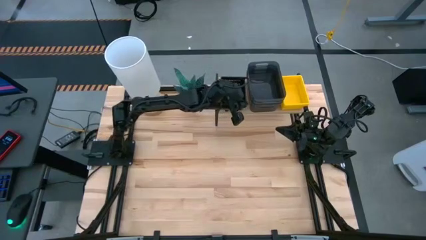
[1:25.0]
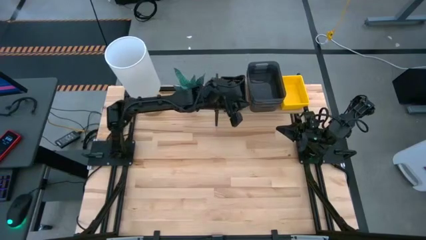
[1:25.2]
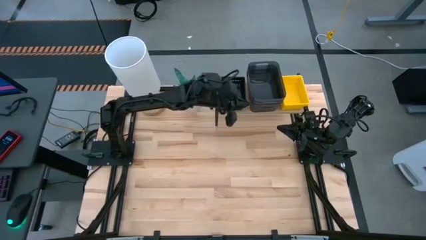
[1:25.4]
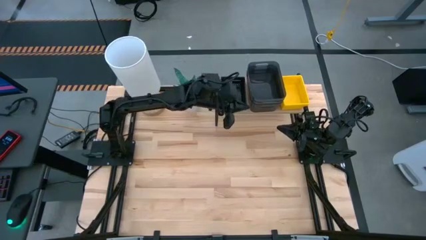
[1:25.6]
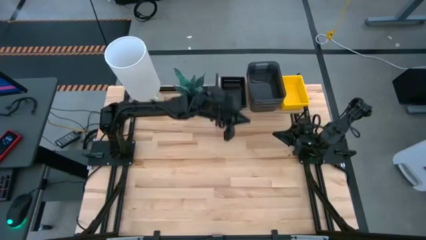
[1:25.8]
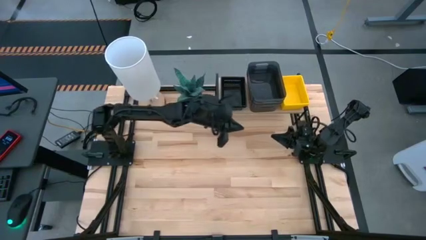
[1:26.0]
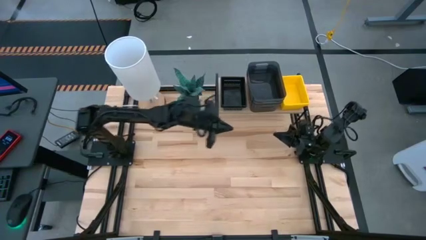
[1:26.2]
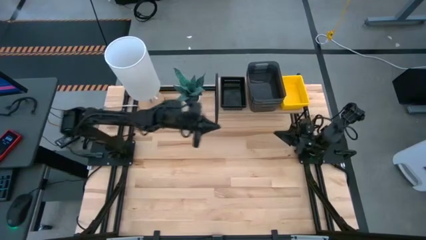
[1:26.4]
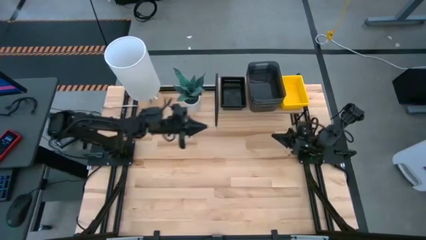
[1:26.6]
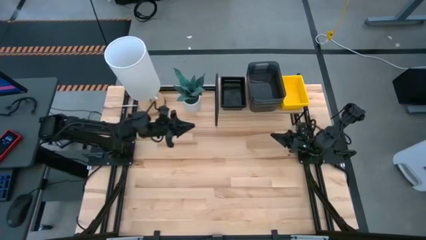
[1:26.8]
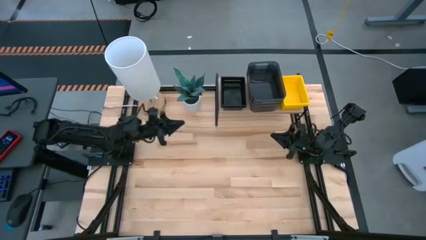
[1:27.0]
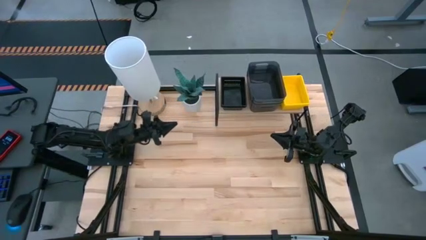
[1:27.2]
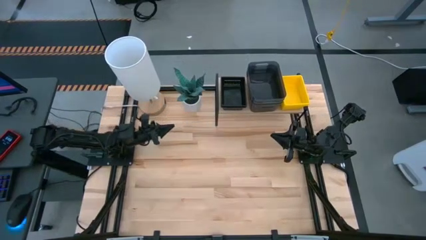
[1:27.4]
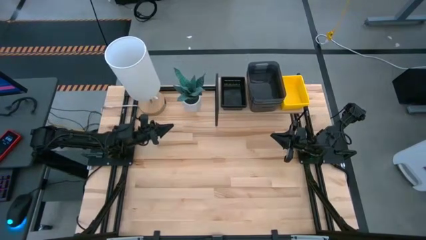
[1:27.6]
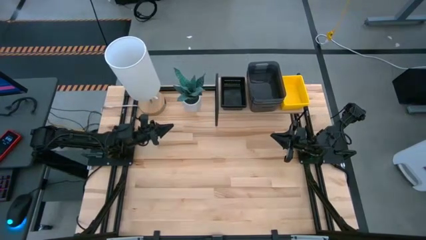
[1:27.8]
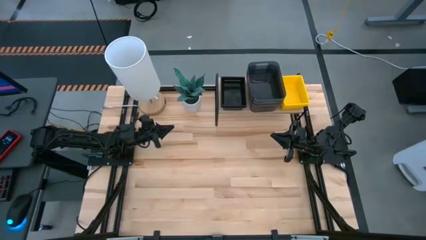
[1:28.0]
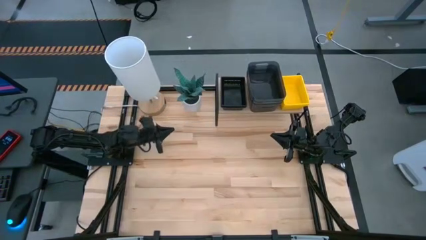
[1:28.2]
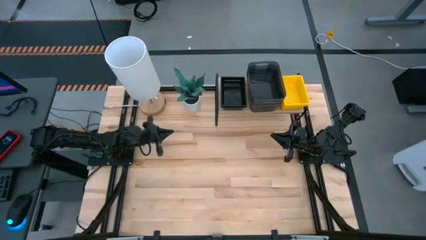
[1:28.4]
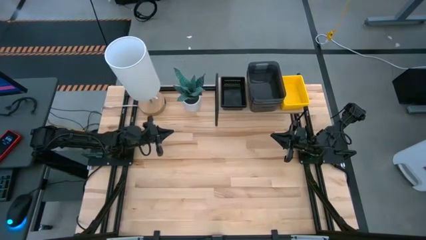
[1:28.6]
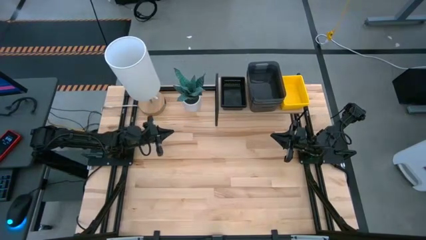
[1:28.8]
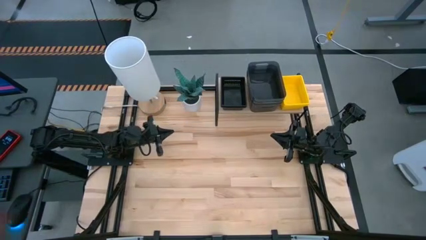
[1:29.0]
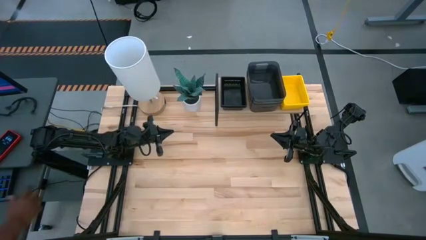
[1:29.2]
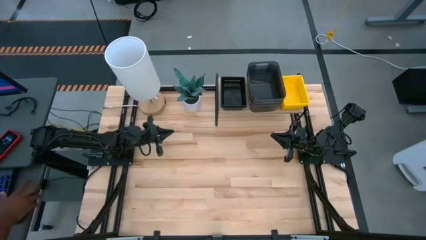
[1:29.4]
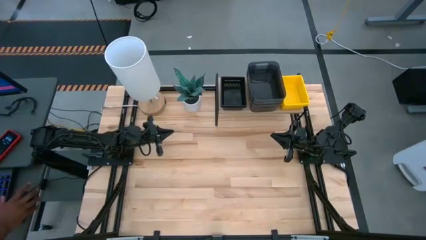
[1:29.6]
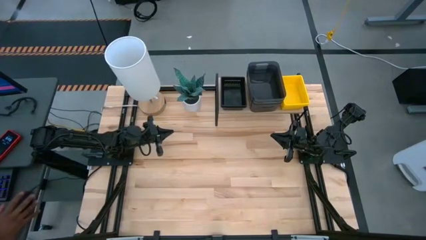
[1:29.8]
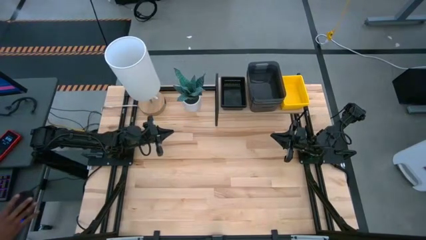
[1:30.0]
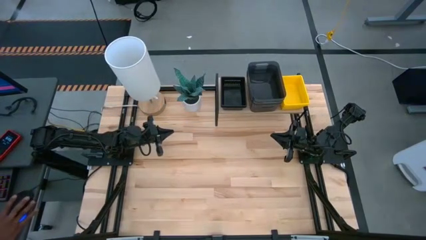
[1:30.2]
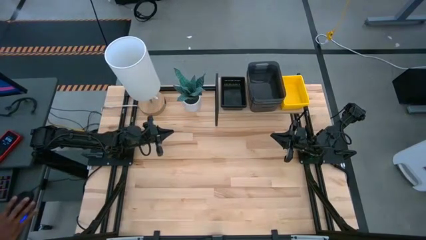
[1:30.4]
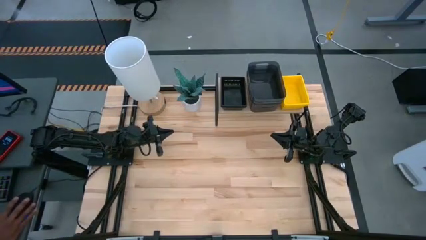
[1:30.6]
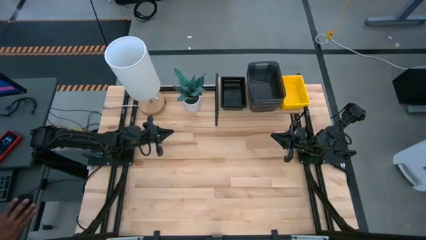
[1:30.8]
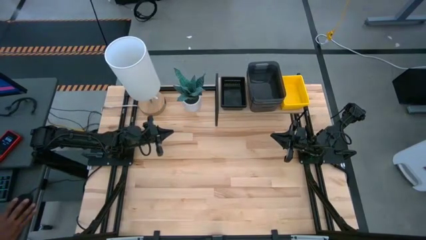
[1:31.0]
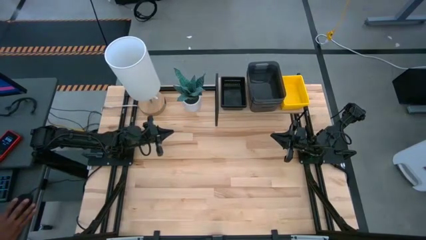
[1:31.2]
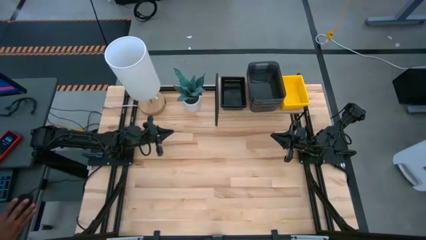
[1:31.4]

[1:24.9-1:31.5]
Task: Stack baskets on shelf by color
Return to Home Position

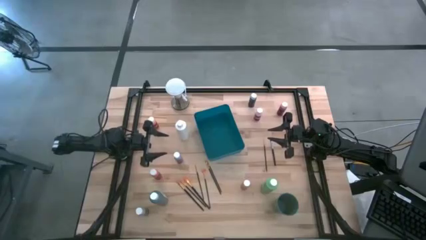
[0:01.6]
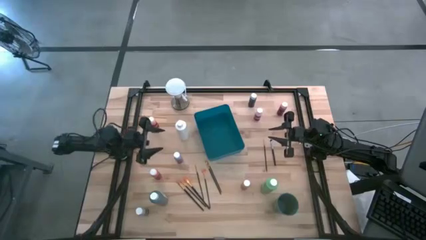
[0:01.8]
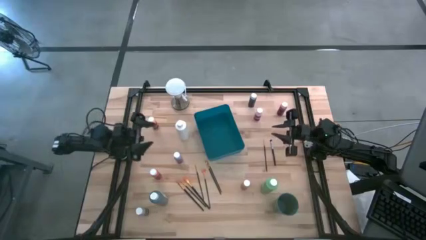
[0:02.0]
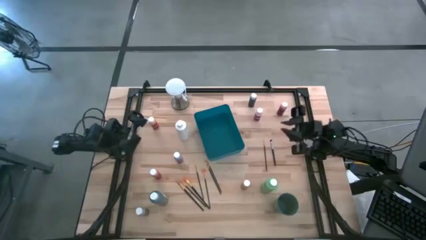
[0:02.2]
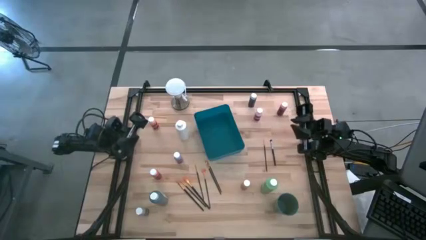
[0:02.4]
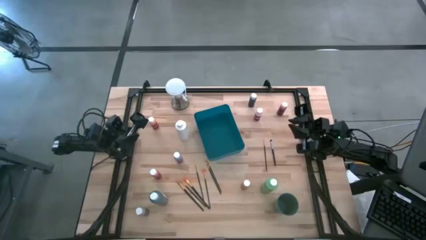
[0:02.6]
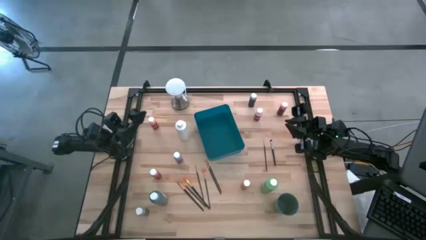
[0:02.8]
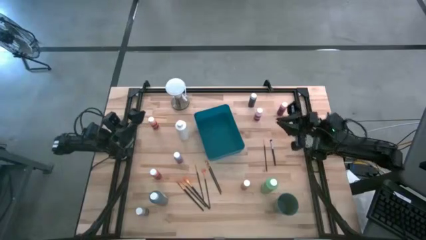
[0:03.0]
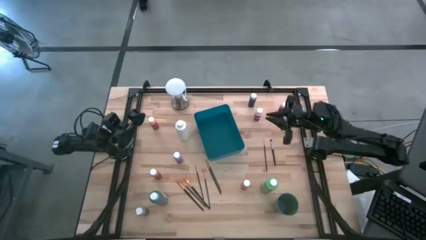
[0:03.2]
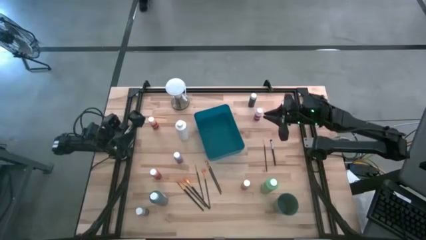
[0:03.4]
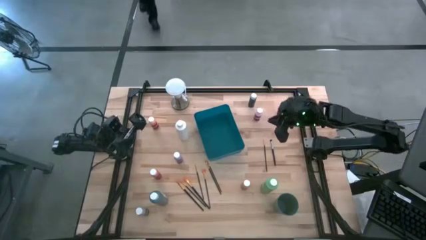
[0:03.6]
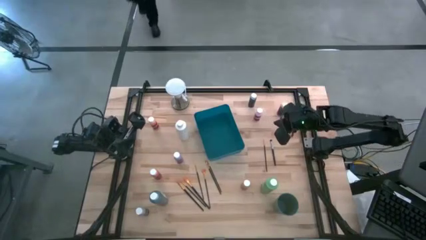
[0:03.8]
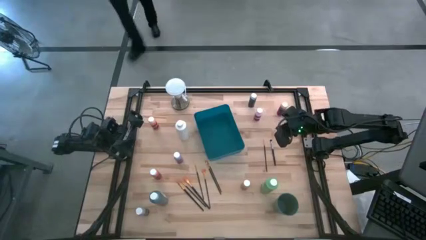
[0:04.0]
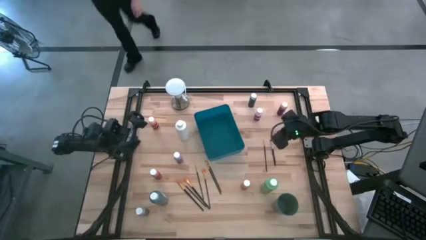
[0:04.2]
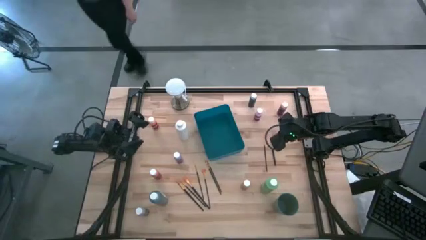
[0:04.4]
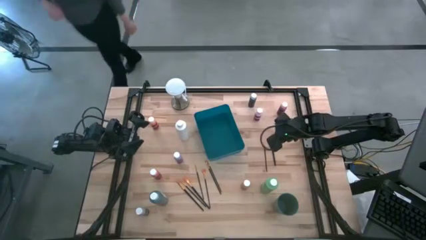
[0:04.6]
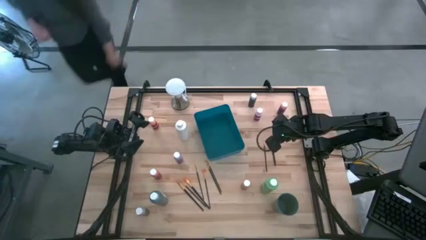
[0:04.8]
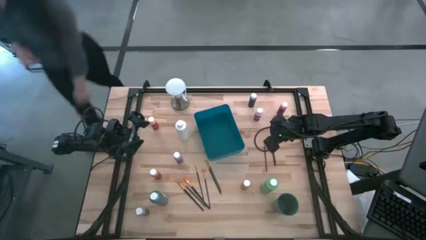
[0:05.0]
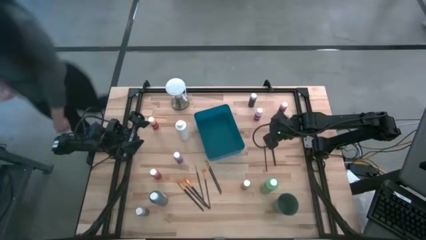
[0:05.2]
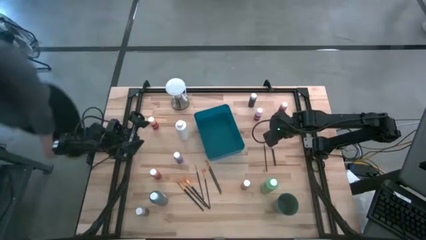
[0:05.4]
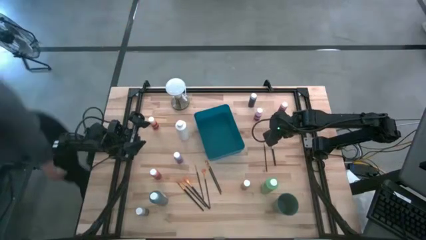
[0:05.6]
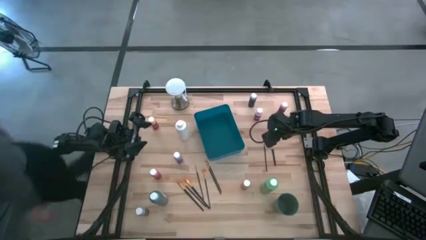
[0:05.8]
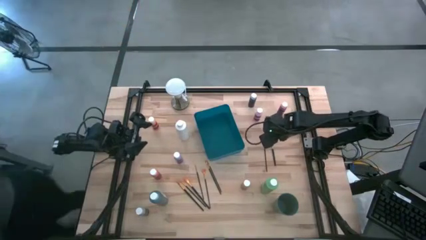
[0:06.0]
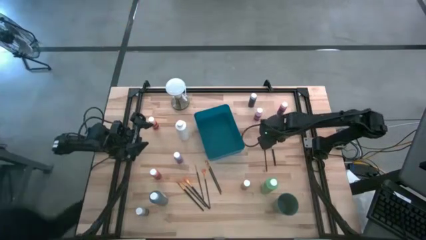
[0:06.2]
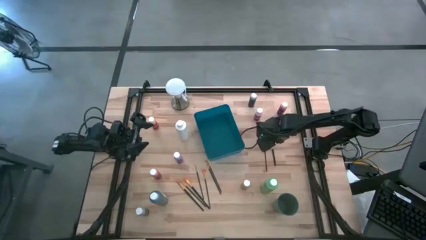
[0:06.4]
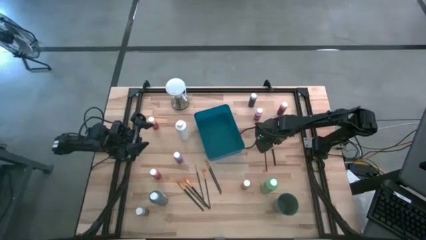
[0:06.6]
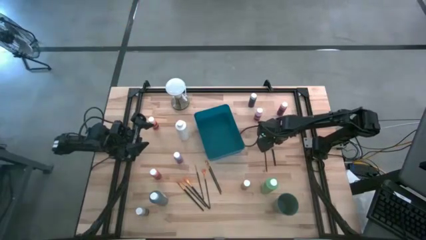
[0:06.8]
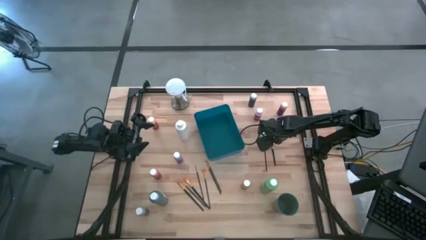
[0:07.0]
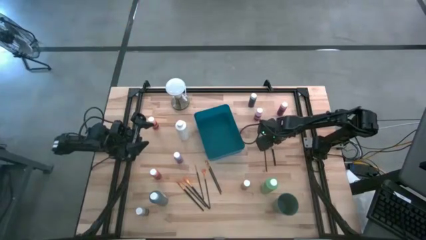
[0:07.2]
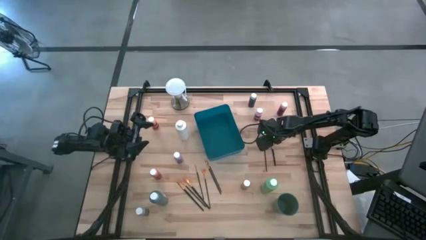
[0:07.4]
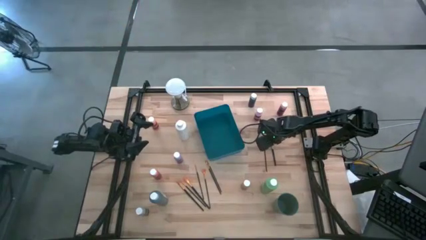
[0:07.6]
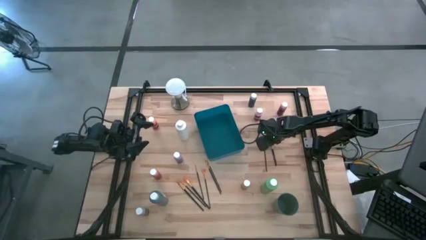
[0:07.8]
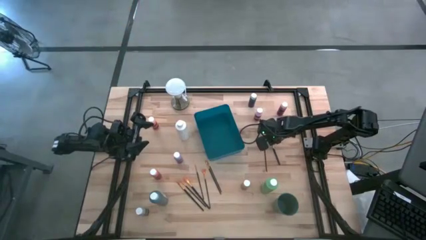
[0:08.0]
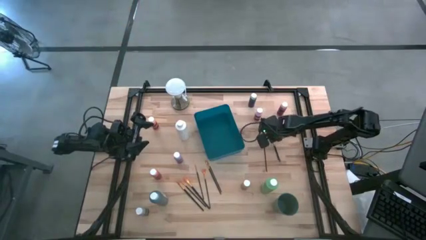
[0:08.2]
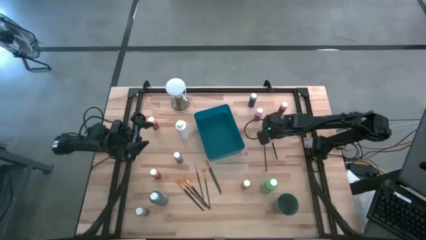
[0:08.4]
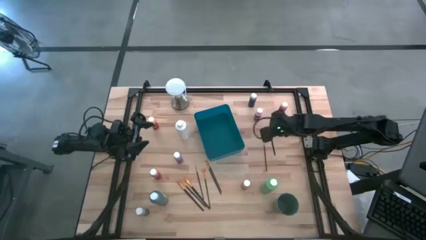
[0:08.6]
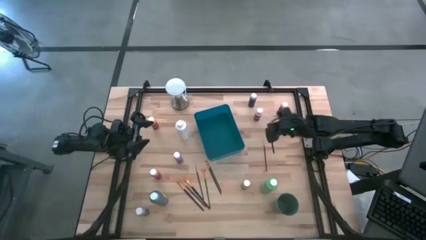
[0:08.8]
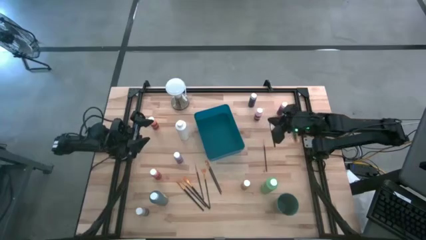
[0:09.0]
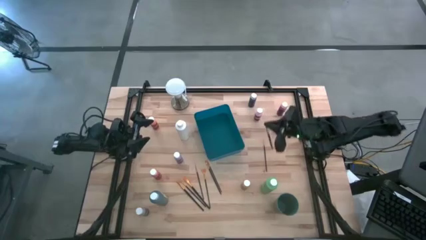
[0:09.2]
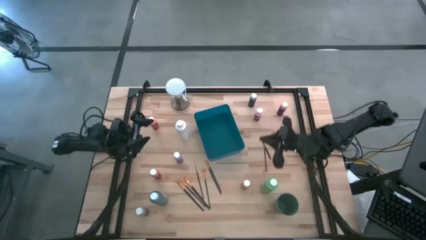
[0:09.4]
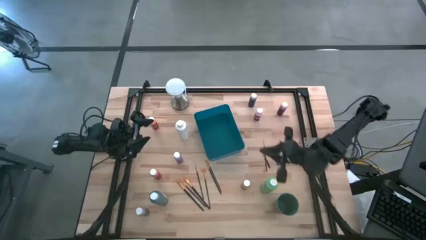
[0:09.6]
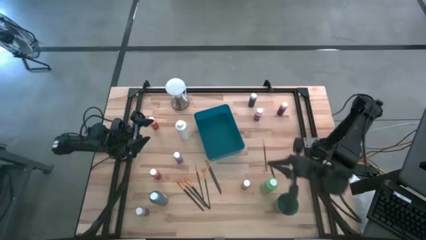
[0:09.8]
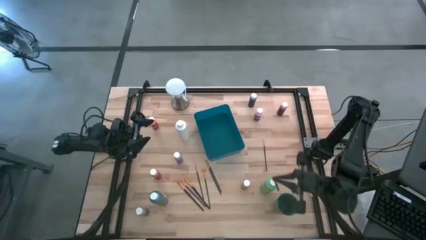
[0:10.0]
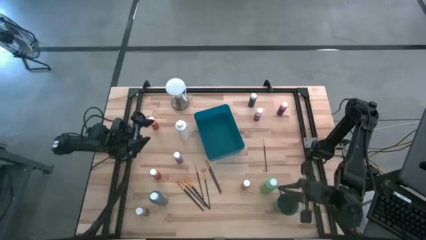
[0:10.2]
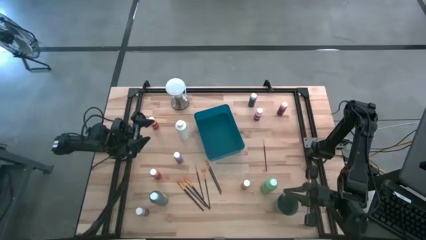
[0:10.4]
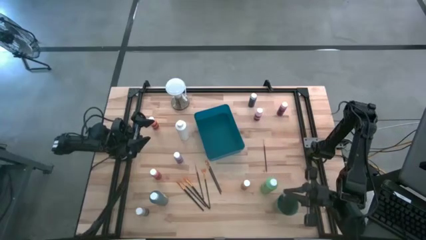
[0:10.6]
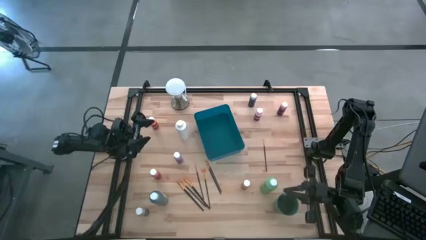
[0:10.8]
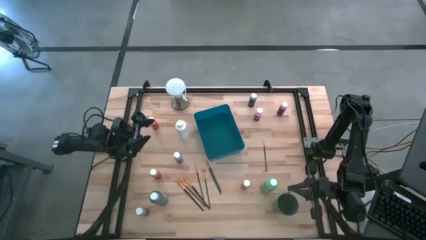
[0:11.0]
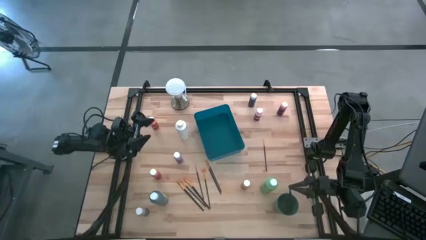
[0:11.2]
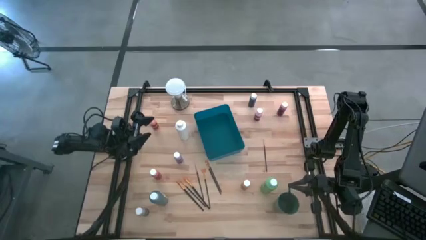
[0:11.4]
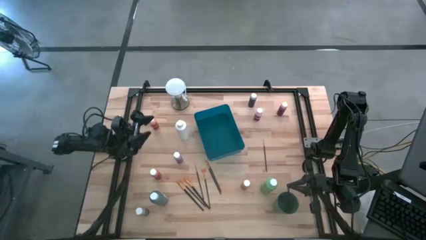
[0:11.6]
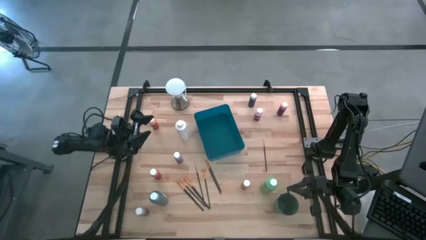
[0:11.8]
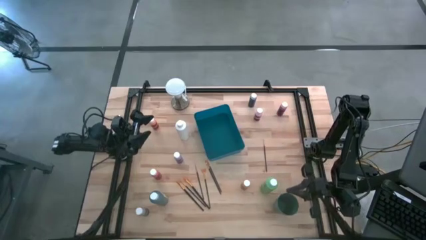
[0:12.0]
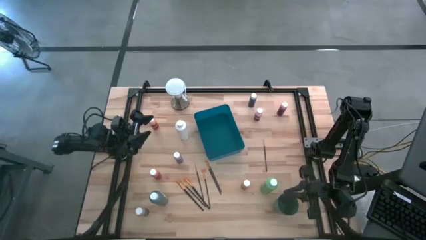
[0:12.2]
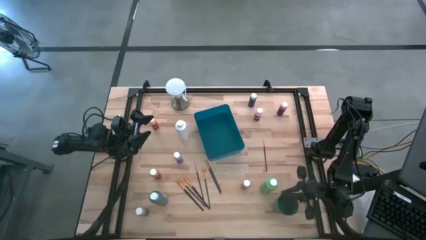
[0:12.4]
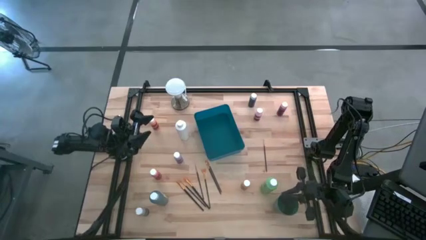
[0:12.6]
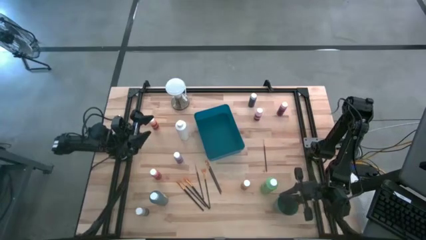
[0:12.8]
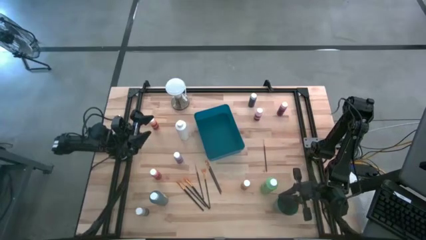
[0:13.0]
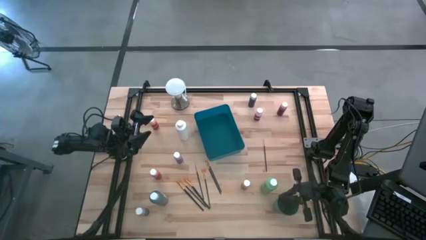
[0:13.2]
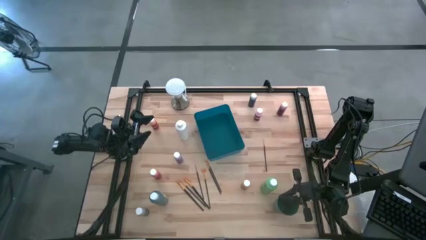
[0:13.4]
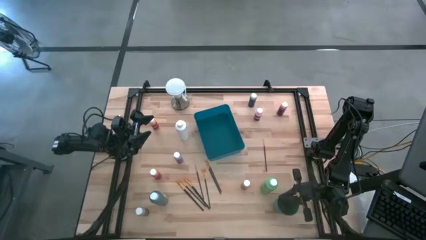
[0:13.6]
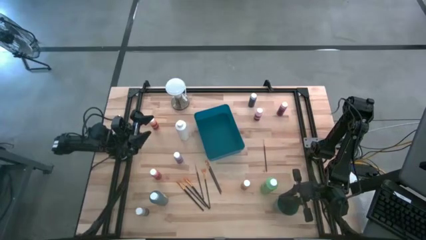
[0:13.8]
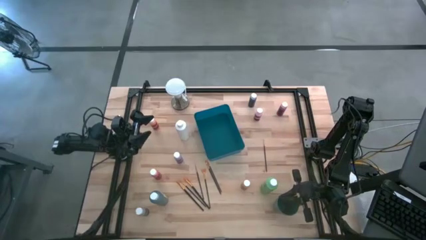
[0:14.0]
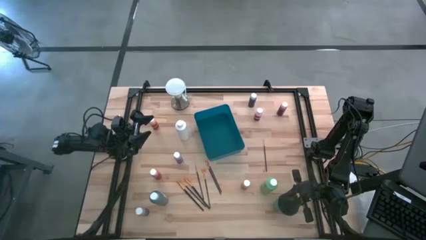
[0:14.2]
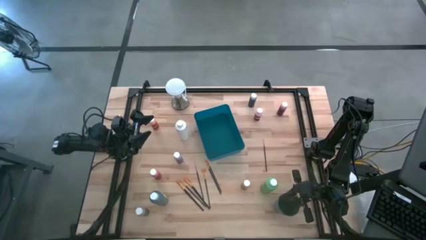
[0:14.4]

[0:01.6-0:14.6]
Task: Pick & Place Paint Supplies
Put the silver paintbrush into the green cup
